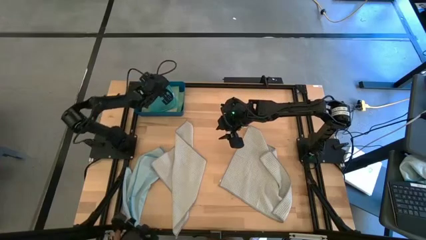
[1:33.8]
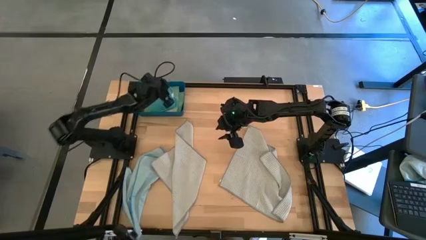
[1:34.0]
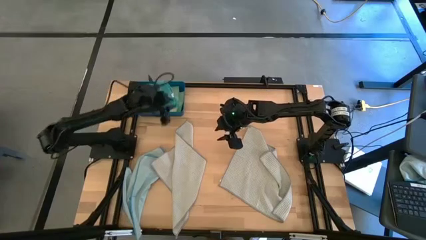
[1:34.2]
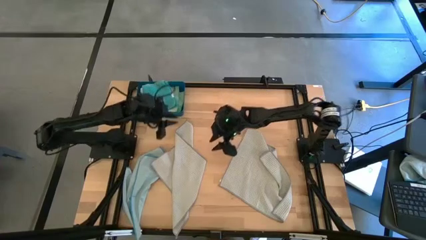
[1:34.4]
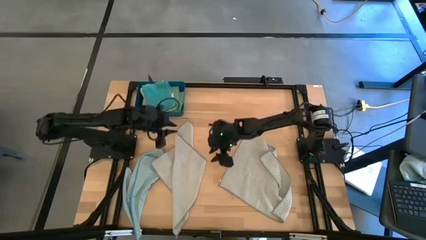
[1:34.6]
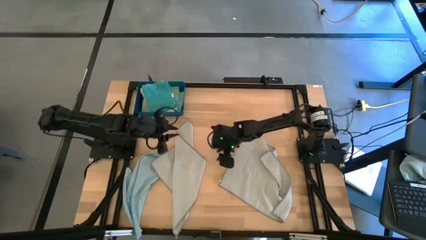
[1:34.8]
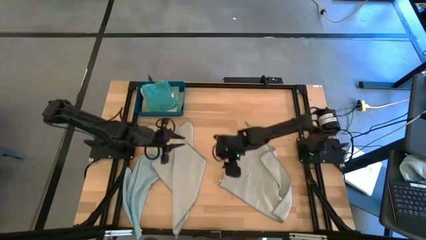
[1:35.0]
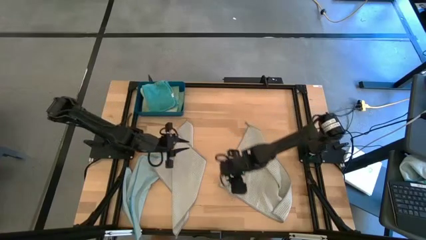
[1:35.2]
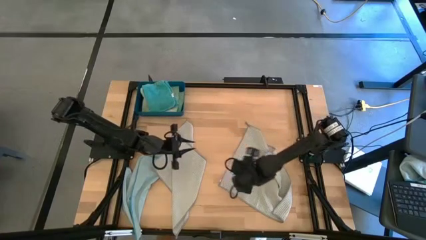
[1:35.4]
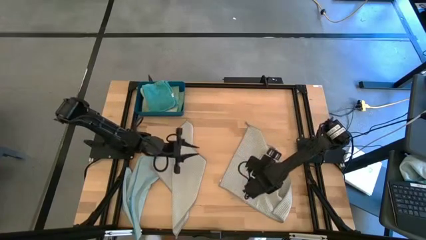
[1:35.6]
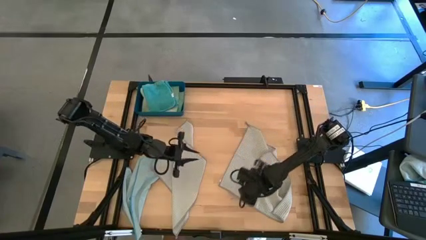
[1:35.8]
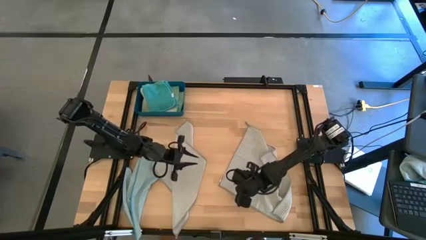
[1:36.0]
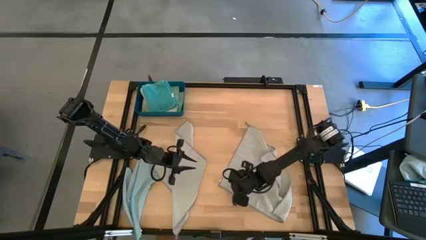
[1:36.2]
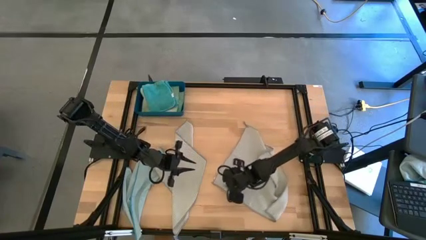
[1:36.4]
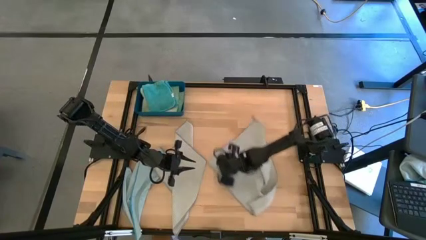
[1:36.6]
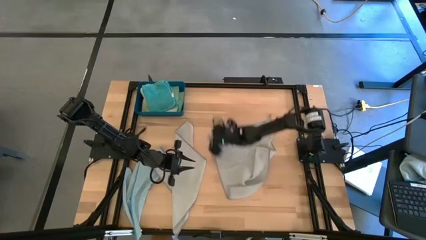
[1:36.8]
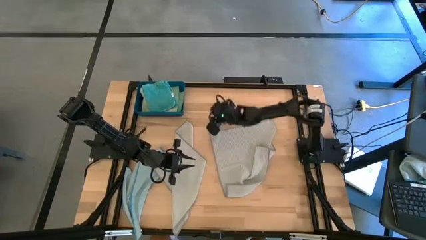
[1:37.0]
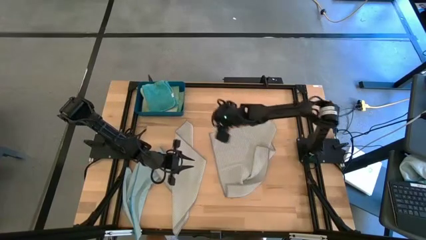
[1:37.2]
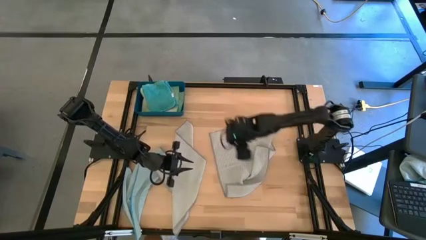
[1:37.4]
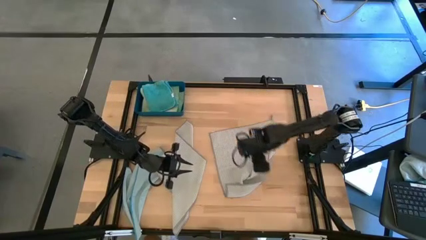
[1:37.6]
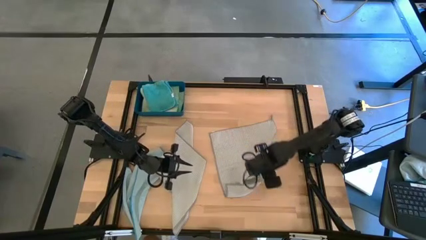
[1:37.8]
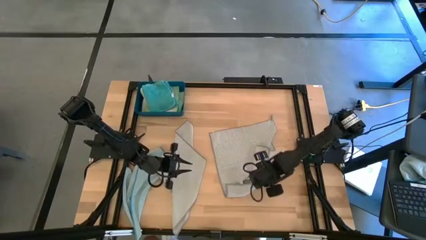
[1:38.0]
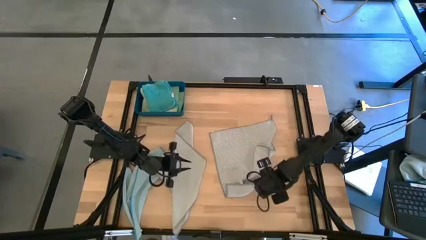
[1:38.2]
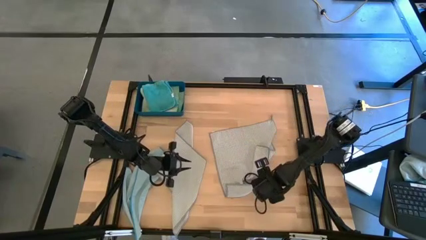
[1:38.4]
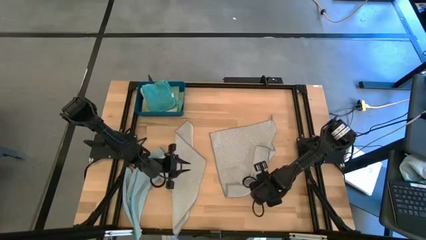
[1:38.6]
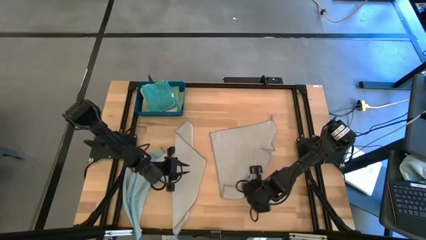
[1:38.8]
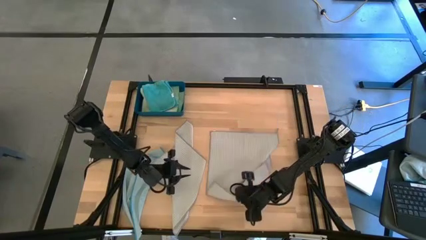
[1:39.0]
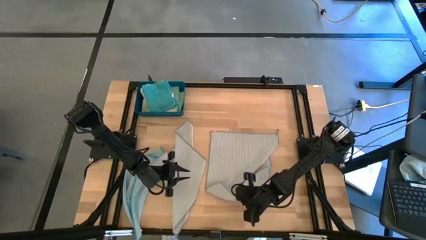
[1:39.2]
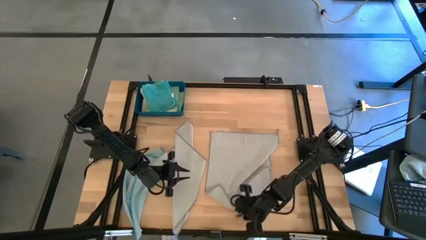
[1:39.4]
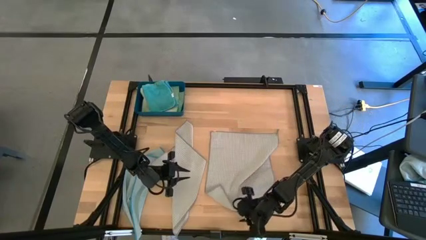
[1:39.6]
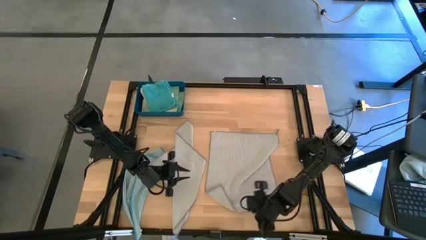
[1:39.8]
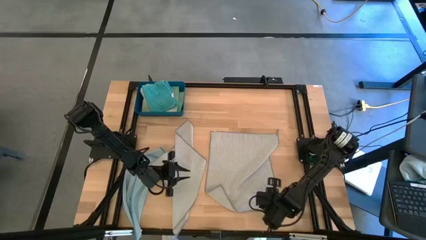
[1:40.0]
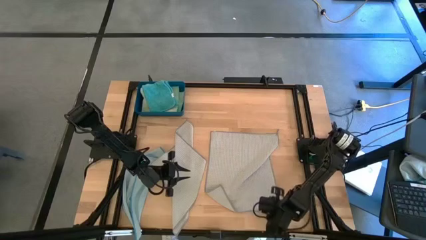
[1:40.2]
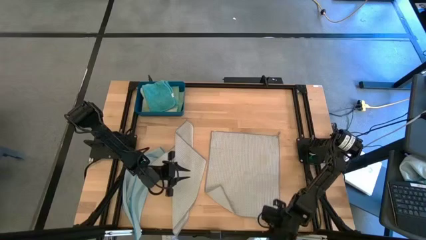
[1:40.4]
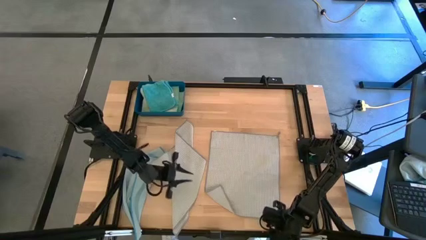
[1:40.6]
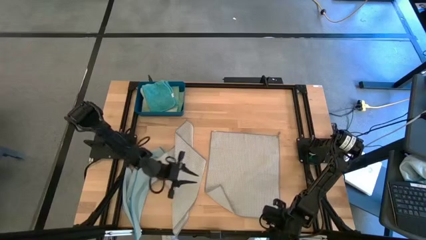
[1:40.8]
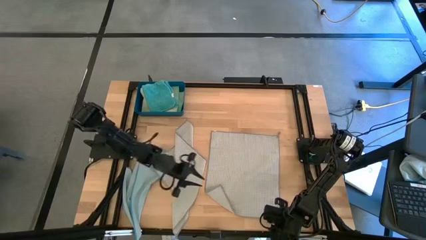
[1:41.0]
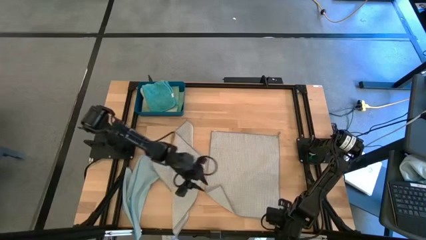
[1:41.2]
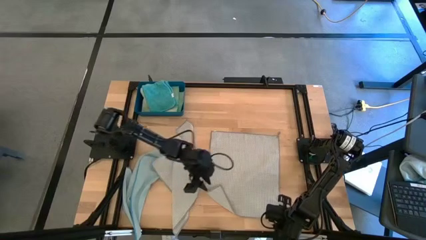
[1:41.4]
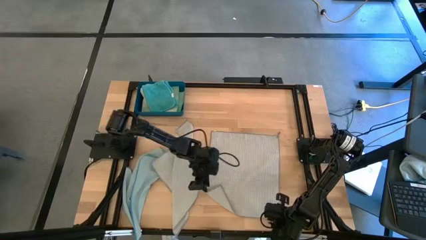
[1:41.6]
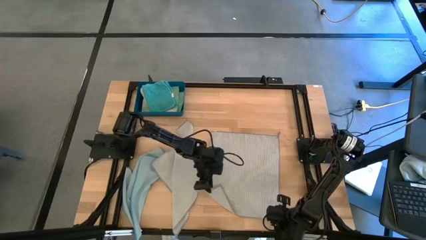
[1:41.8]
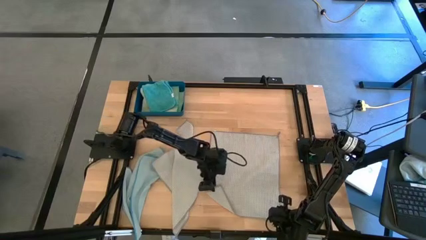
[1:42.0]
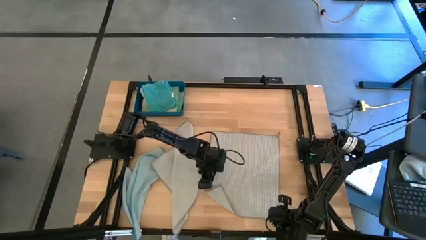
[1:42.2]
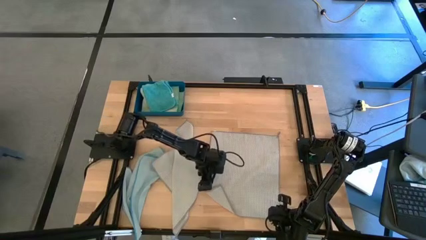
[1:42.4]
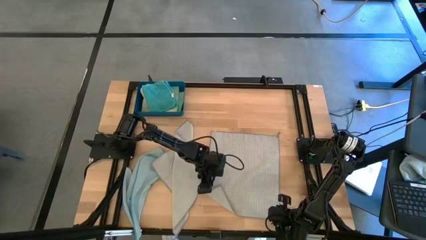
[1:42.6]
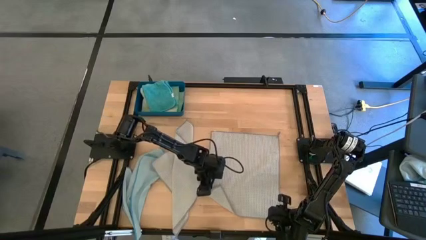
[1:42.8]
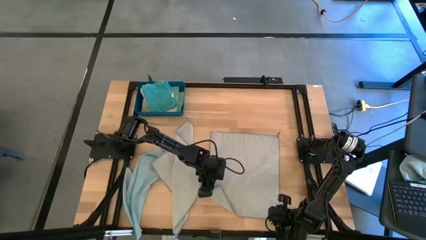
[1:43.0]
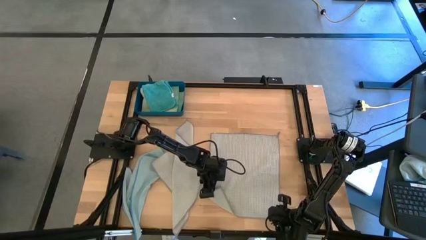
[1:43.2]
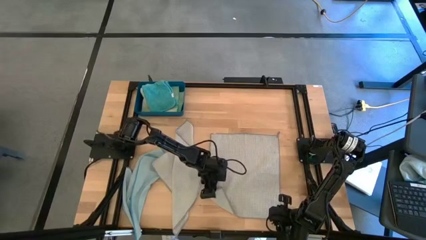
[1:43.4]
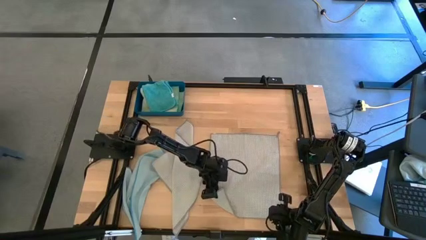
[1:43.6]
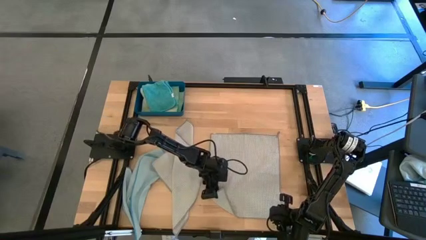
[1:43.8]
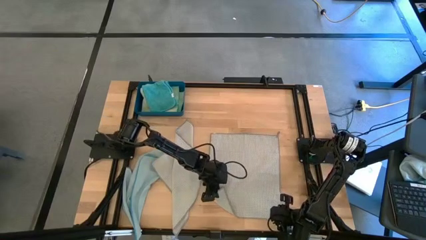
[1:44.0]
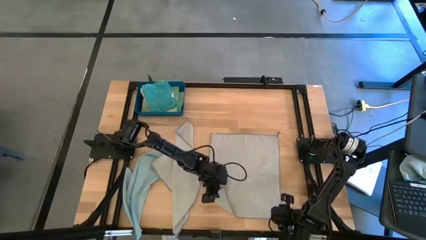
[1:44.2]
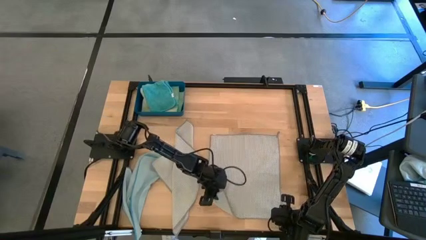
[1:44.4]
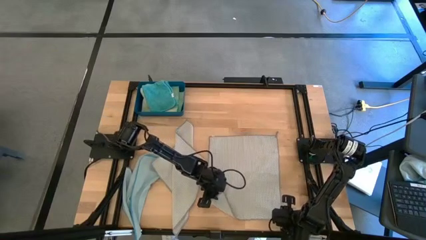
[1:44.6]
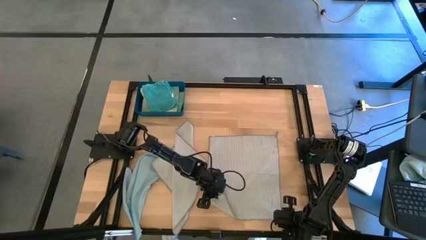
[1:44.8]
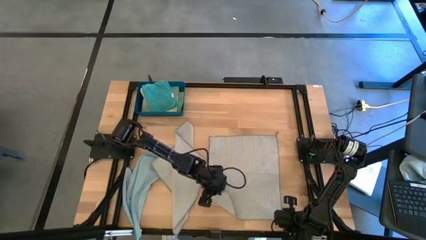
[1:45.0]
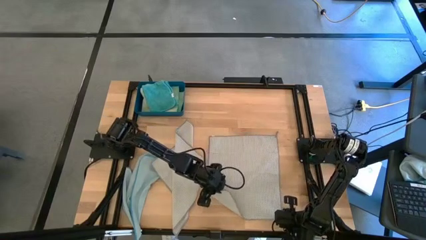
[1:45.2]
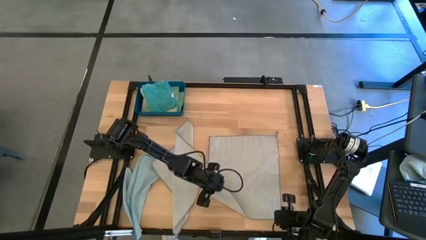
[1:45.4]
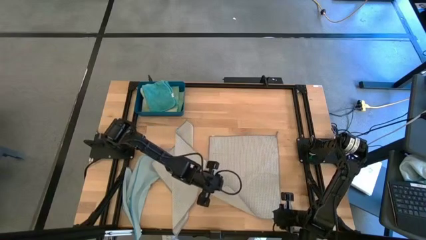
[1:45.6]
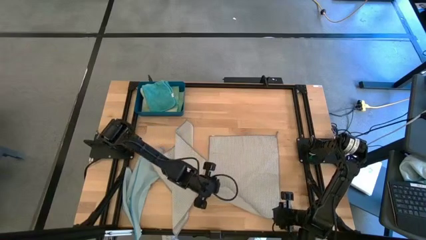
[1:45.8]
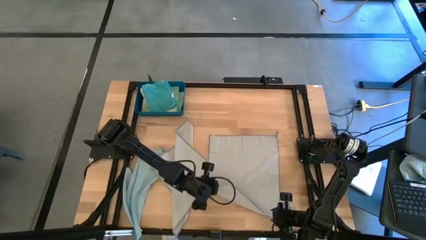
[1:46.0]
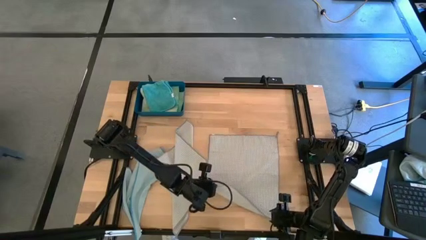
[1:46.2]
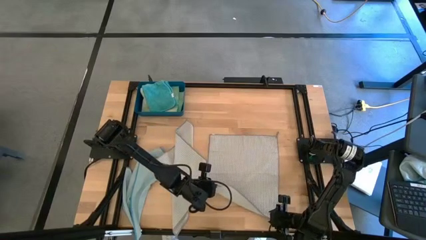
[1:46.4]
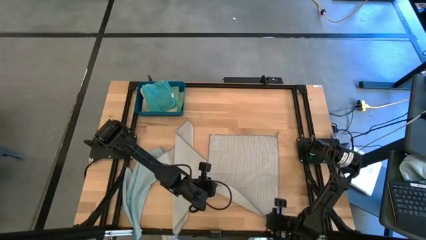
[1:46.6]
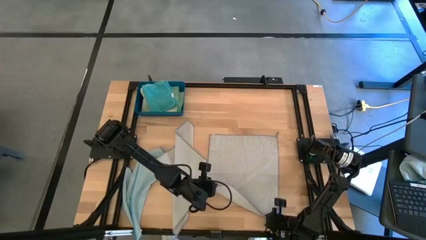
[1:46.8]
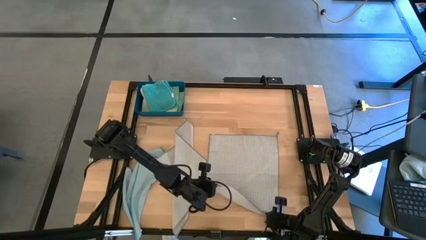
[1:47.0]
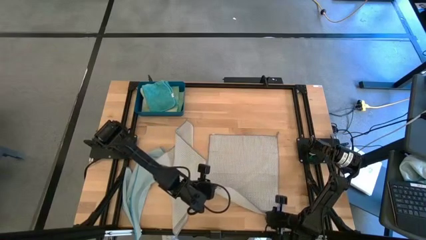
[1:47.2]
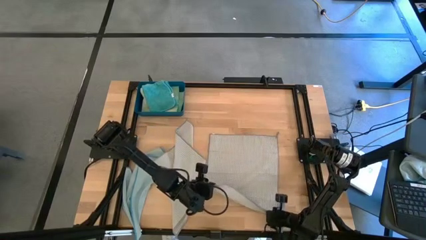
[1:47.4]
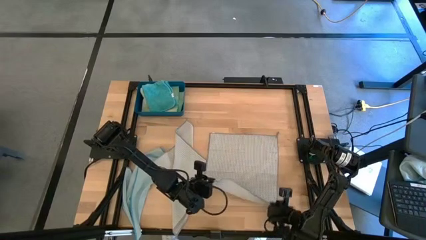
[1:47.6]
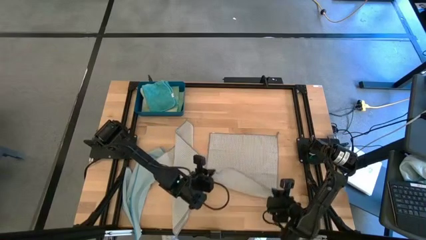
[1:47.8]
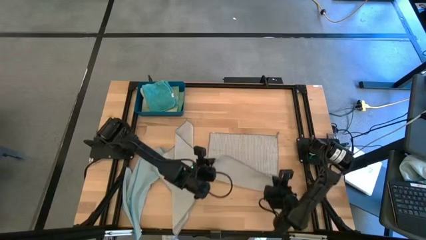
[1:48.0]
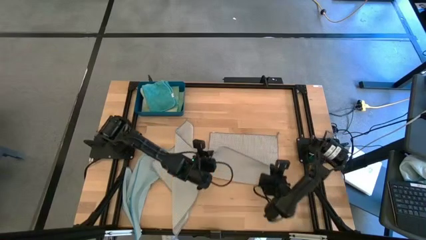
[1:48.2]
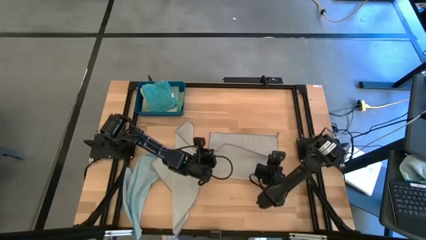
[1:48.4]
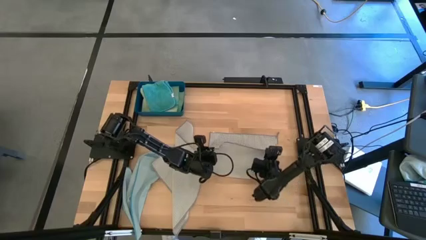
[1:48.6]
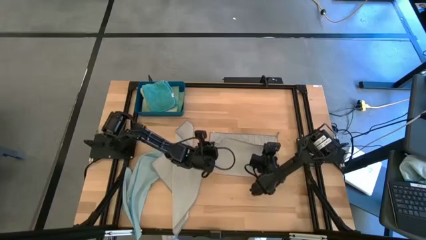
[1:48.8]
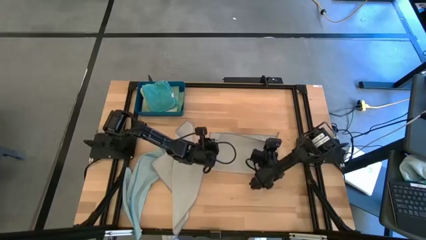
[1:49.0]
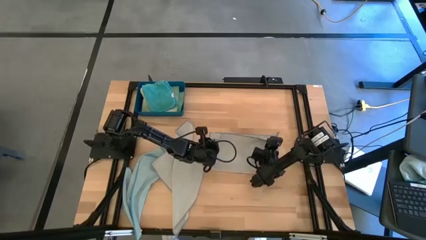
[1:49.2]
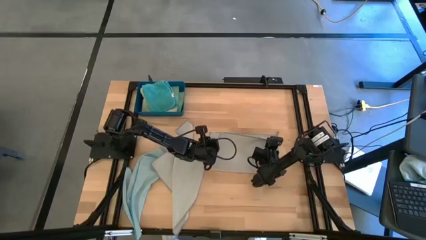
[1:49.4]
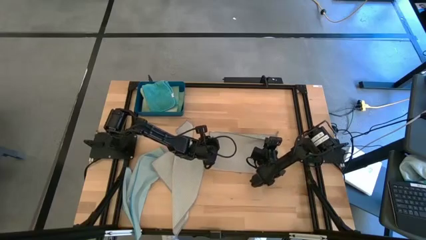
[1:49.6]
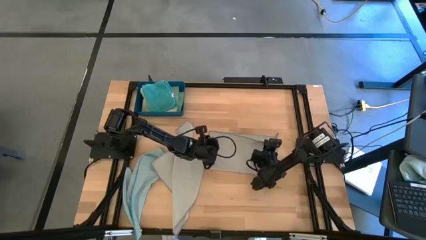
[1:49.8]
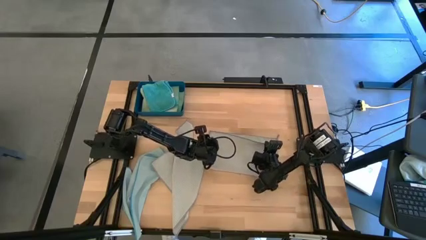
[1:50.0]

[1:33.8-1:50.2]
Task: Fold microfiber towels
Fold the right gray towel
